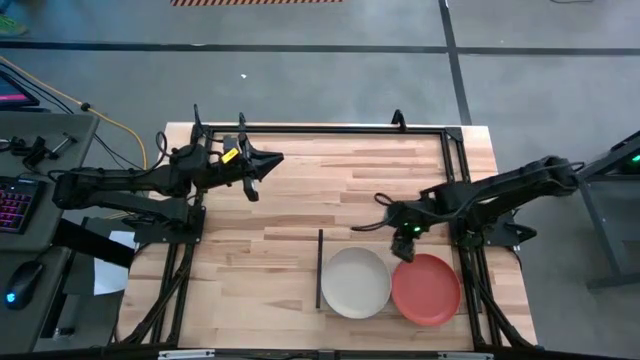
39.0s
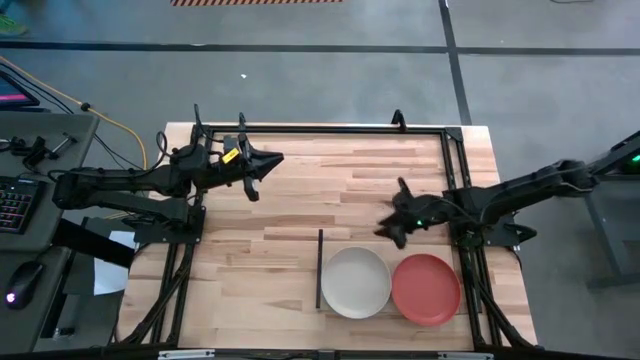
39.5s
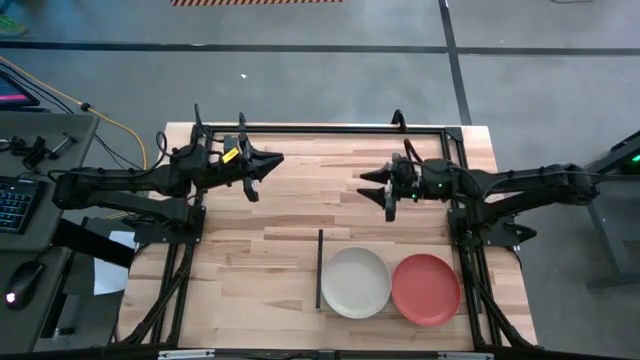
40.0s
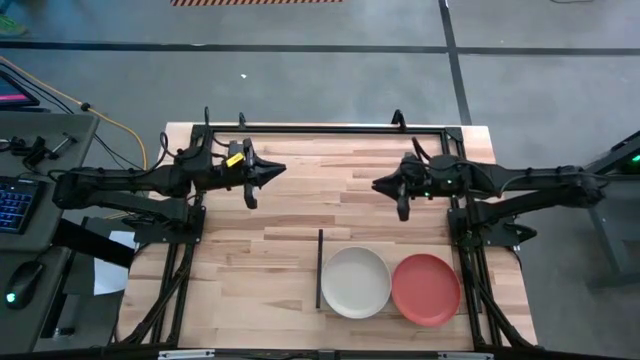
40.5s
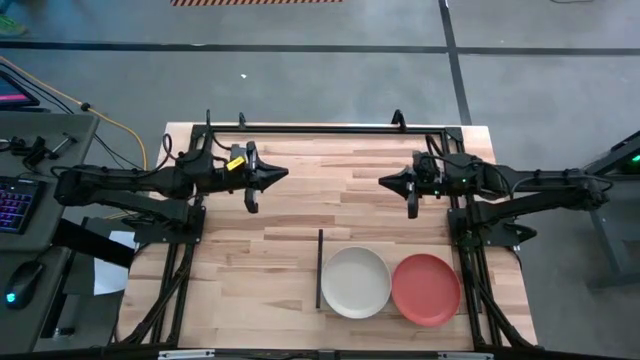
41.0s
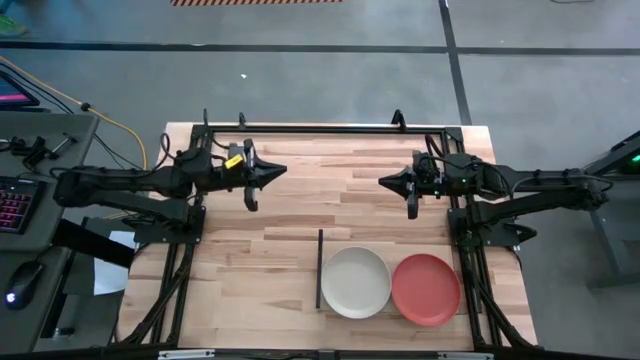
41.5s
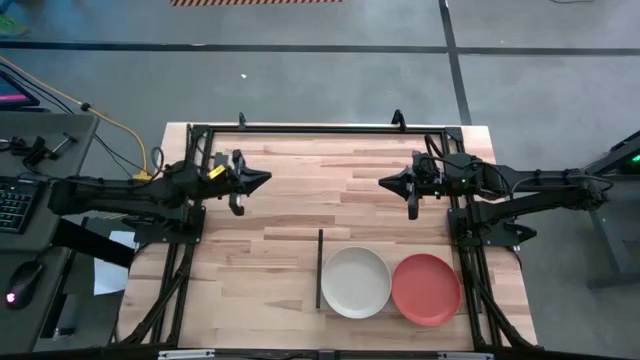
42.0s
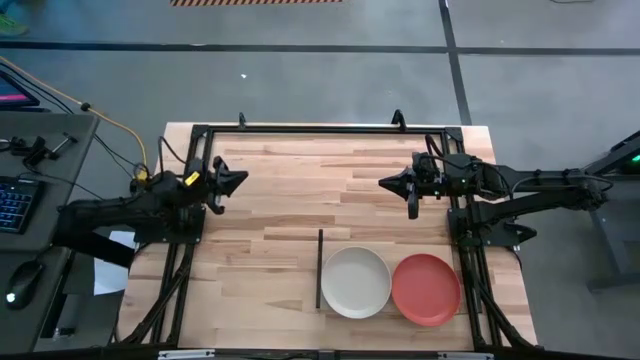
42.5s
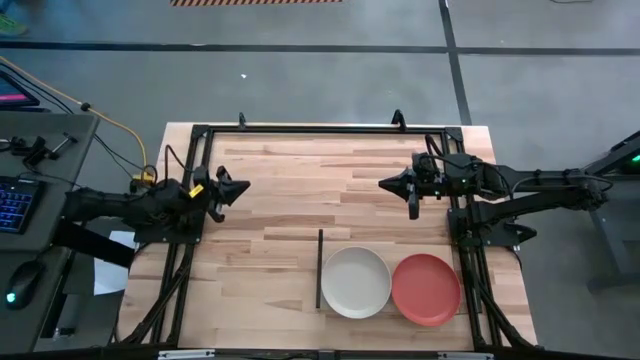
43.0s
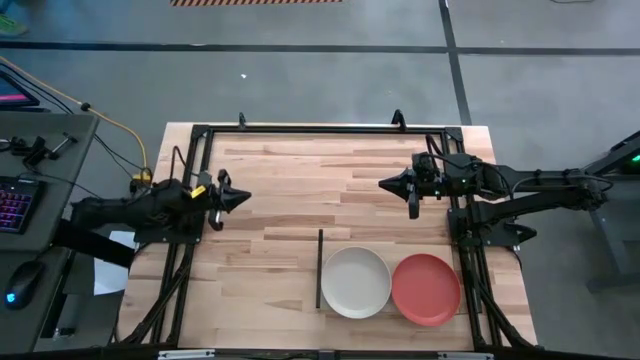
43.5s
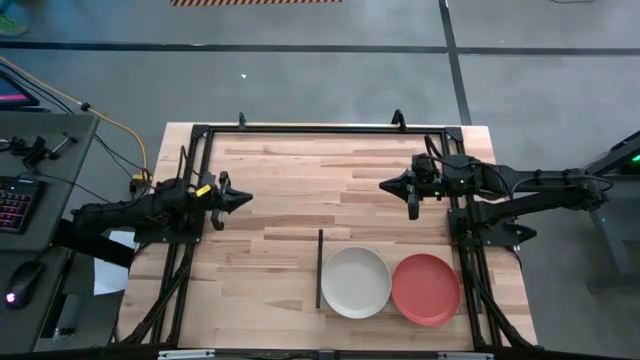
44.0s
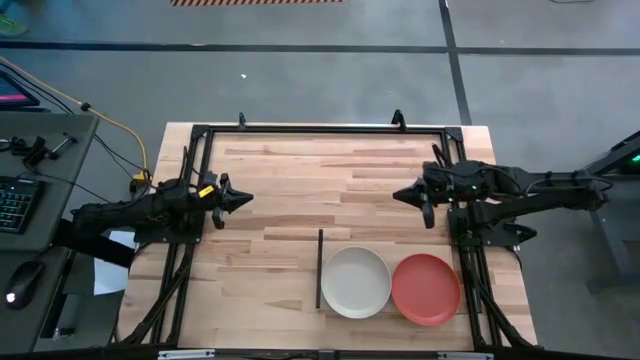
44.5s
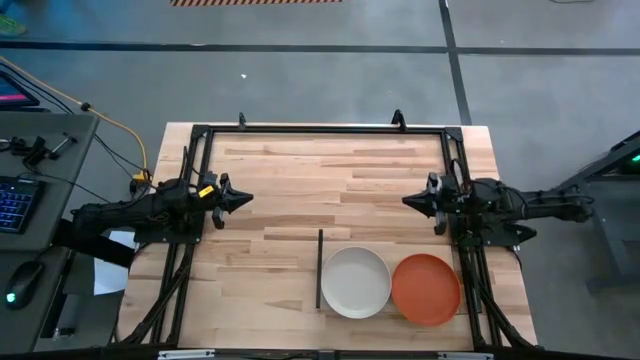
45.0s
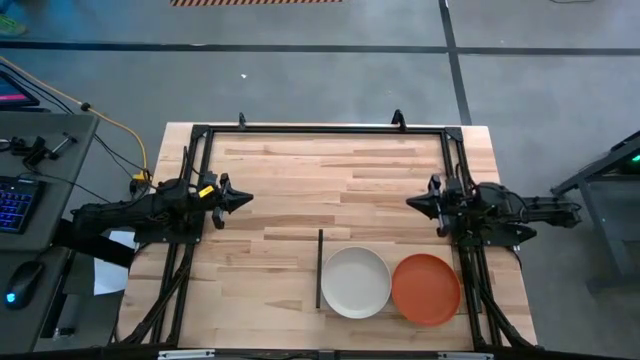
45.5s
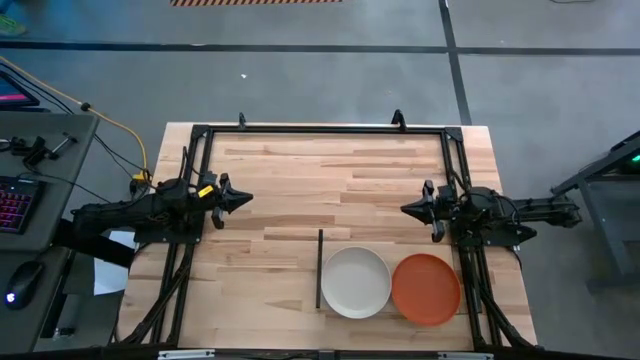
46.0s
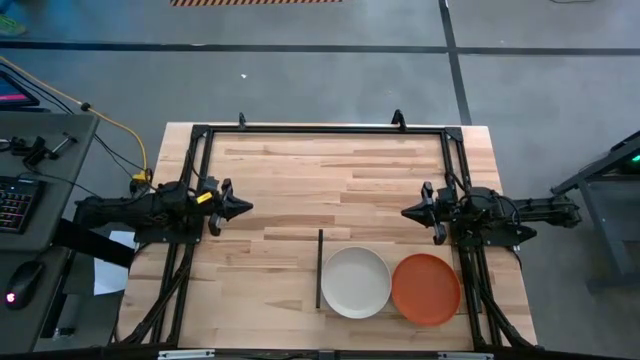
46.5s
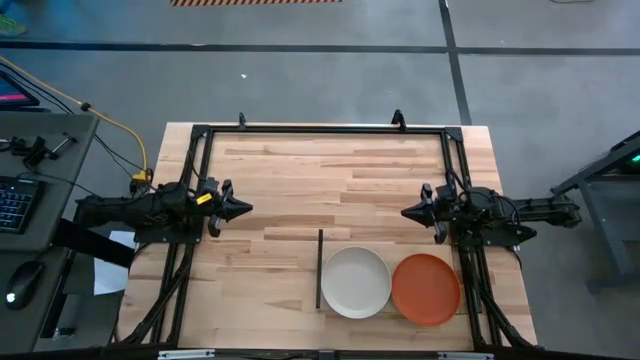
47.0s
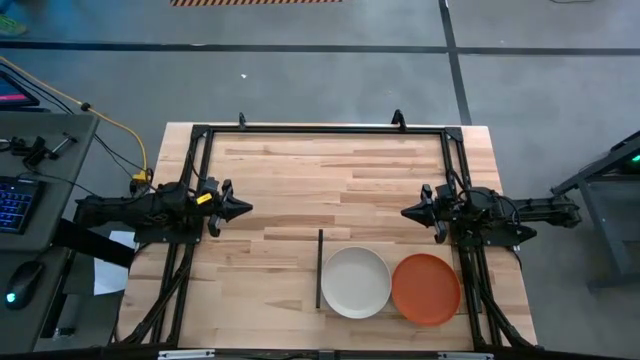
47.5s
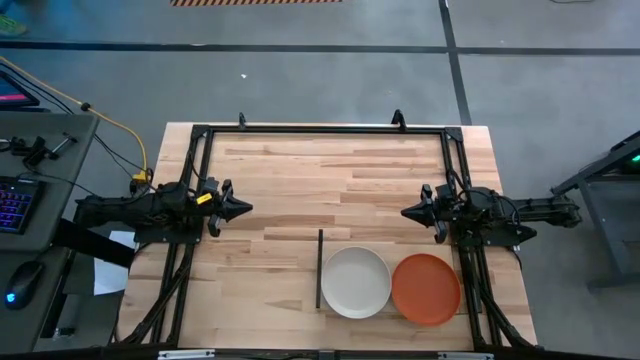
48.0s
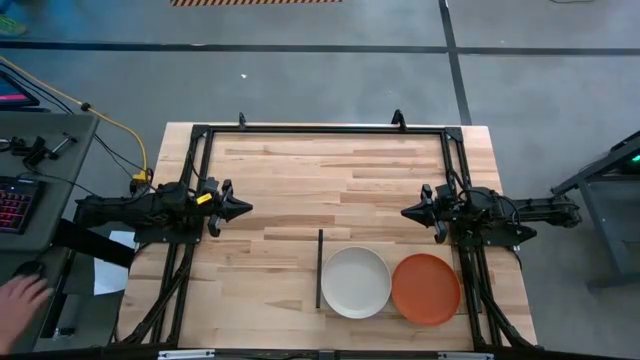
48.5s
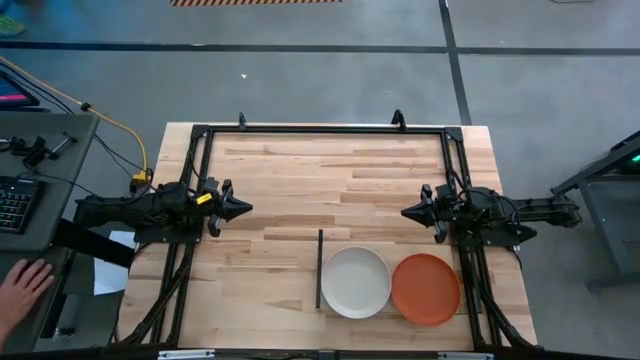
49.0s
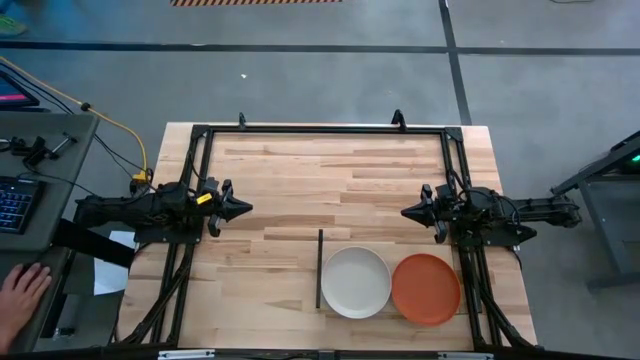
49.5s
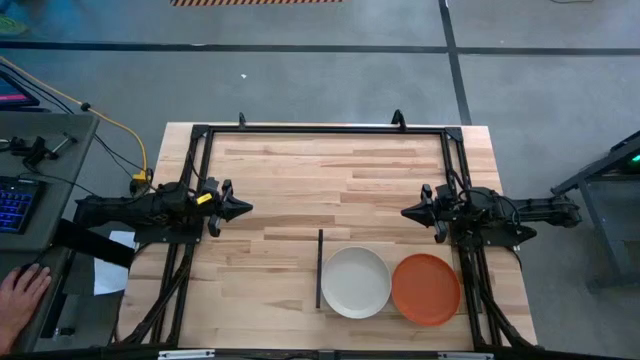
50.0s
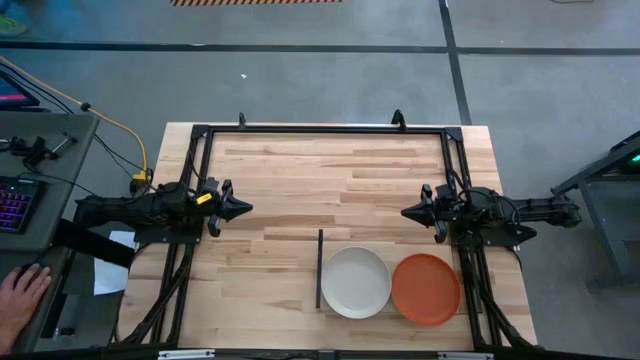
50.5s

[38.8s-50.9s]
Task: Place and stack plates onto a shelf
Return to Home Position

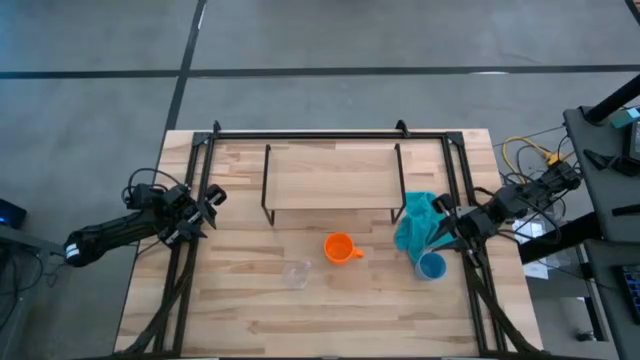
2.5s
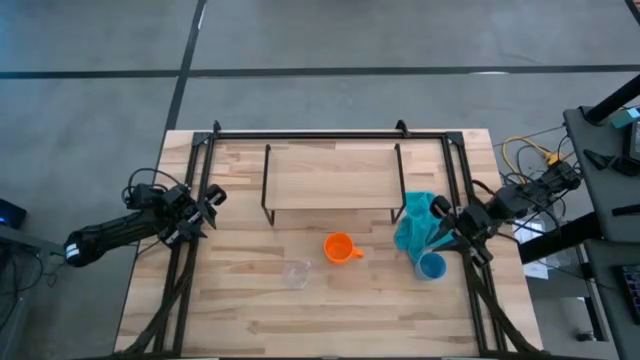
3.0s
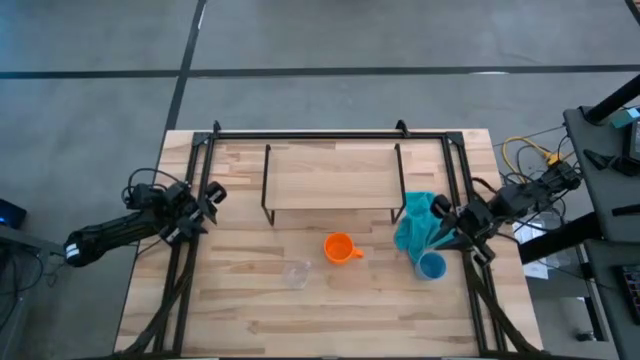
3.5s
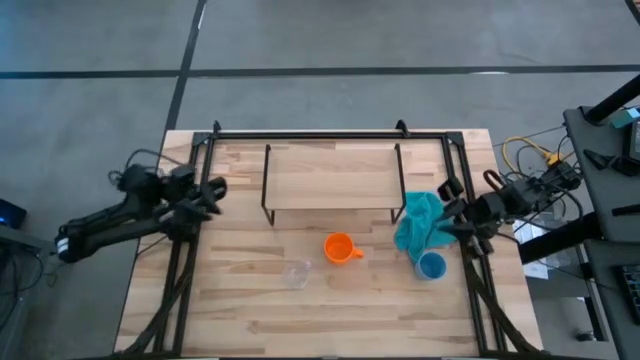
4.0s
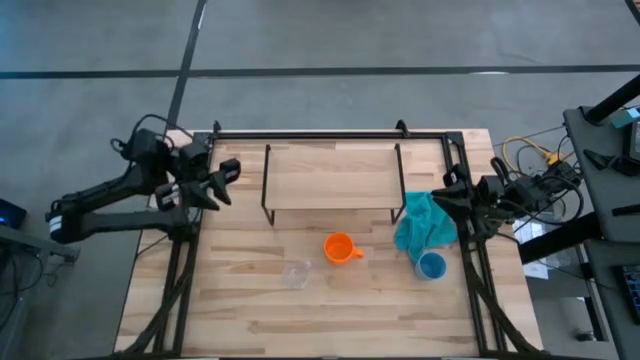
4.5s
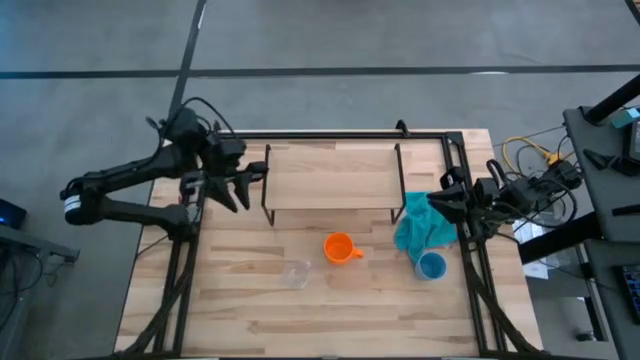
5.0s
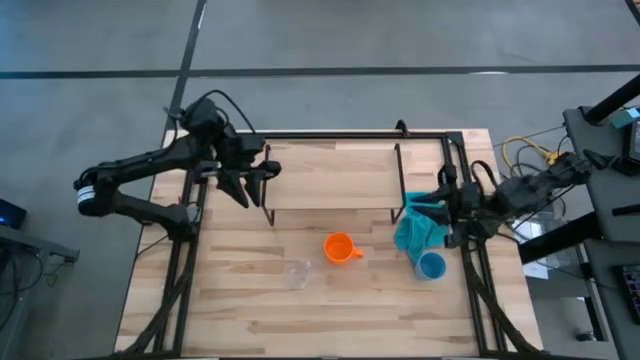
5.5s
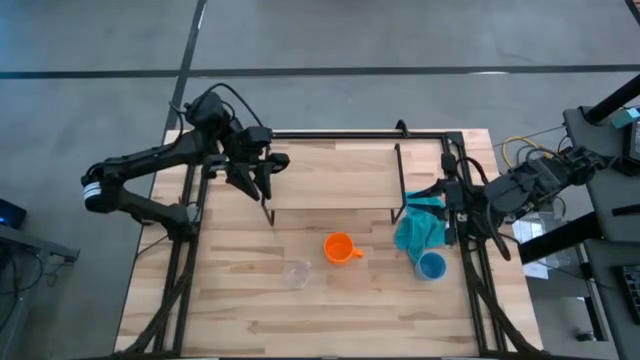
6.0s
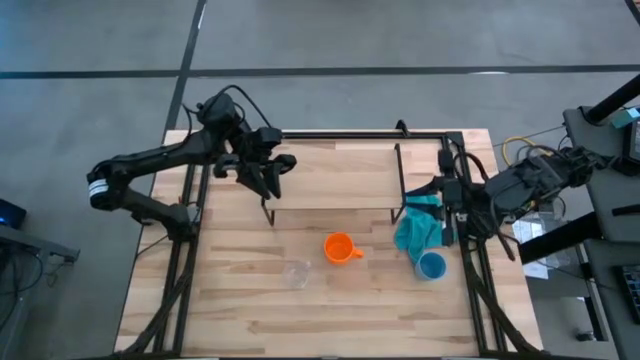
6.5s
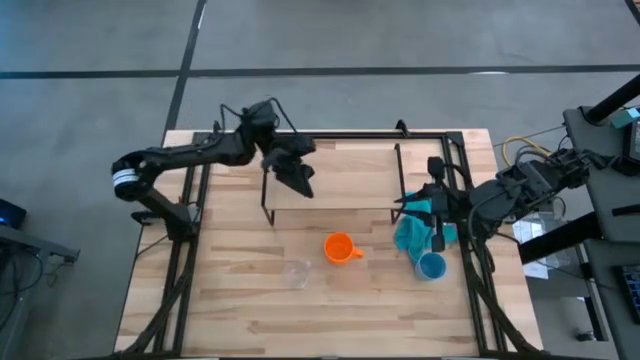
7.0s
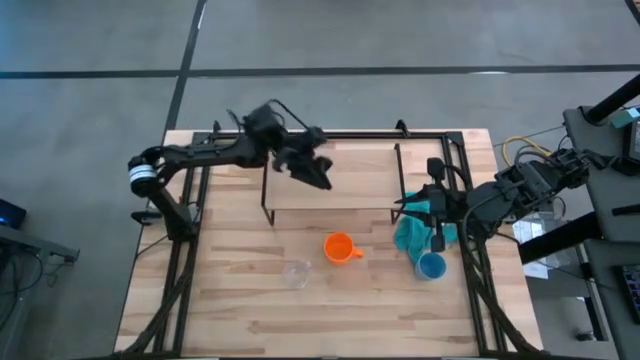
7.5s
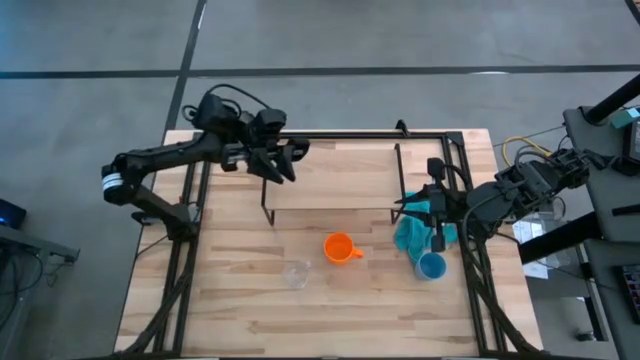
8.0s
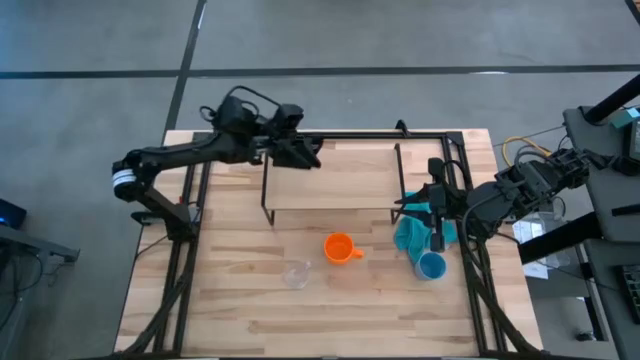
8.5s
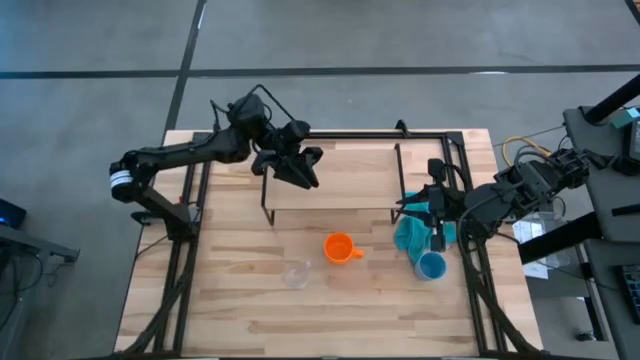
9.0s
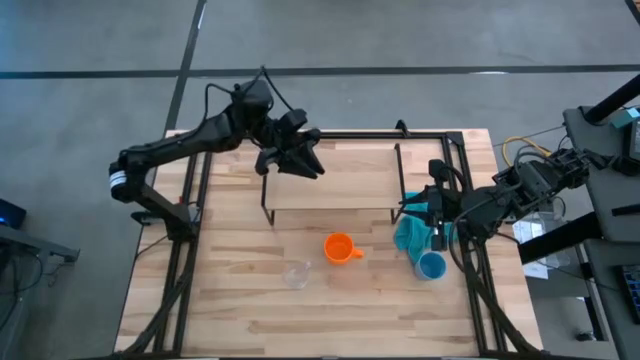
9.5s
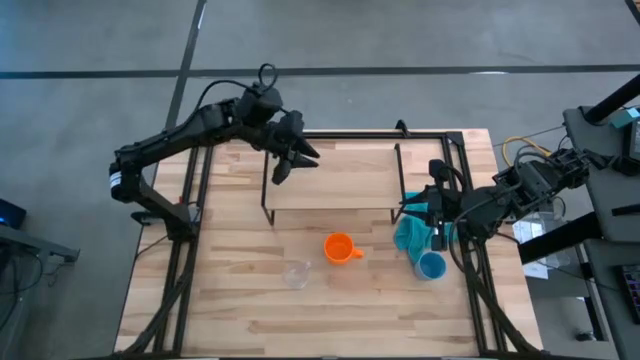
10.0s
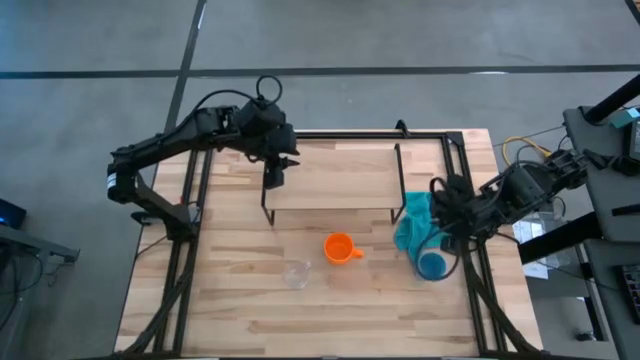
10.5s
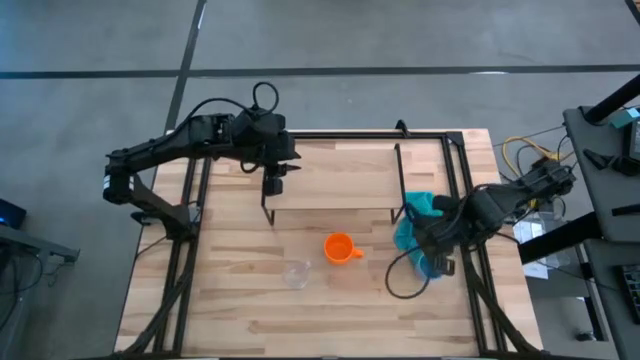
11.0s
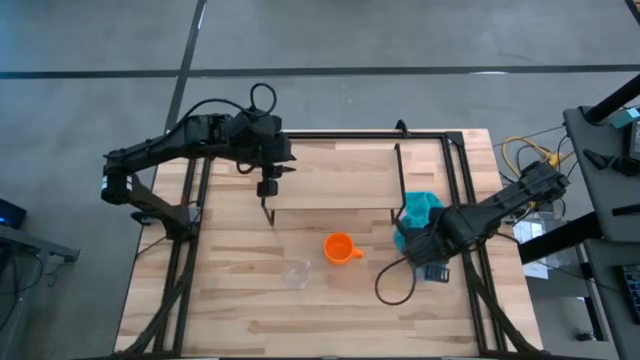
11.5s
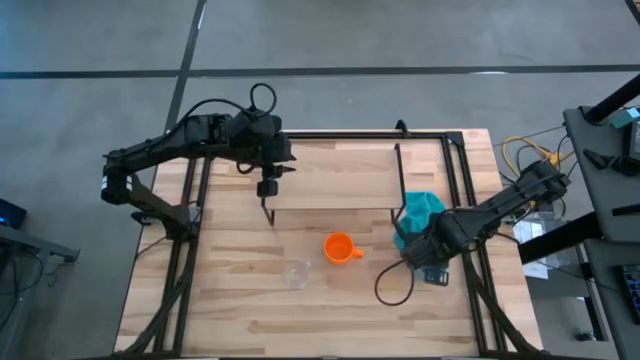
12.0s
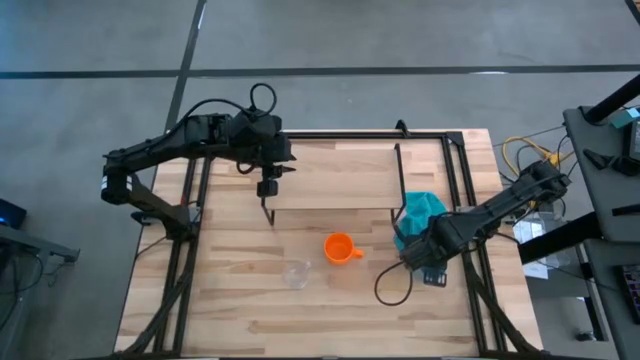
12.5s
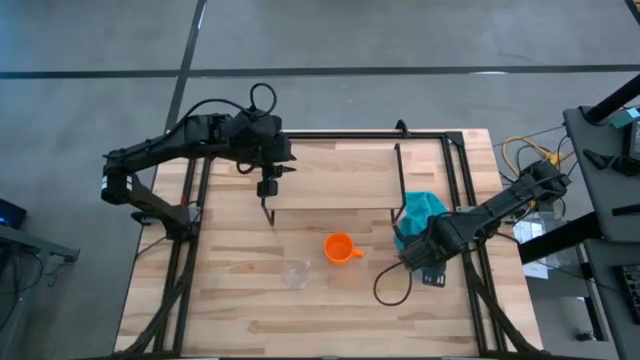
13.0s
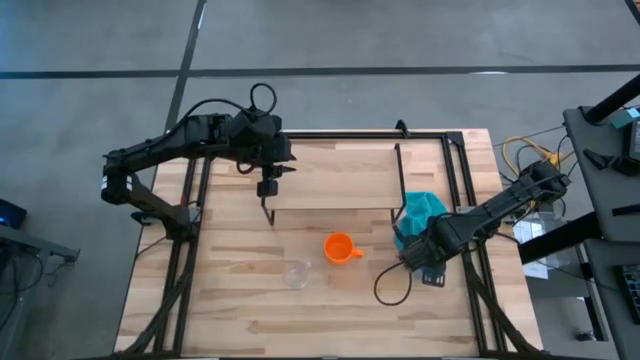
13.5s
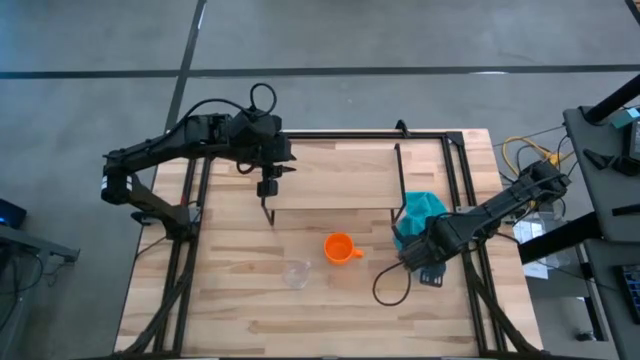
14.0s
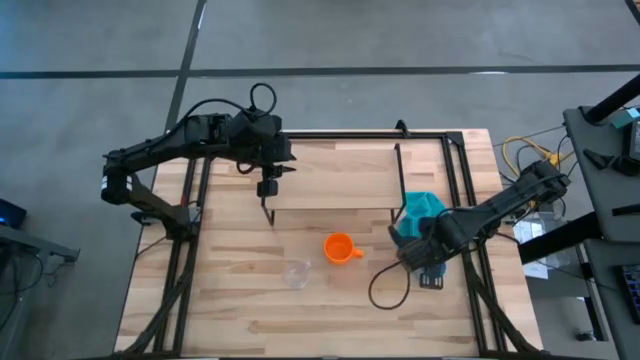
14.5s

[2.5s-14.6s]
Task: Stack small to large cups/mugs on shelf
Put the blue cup onto the shelf
